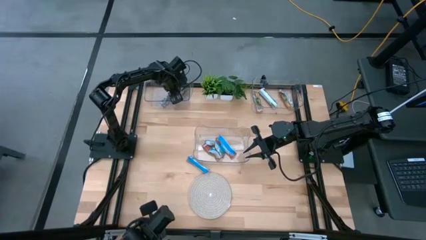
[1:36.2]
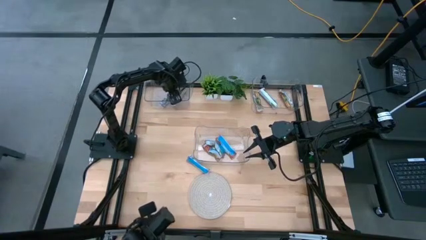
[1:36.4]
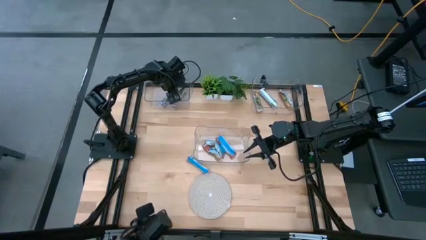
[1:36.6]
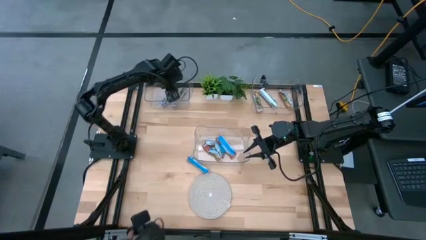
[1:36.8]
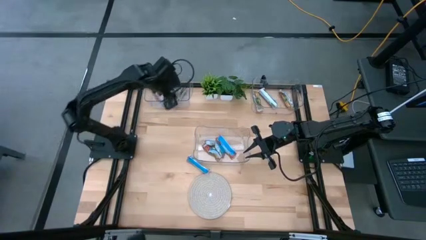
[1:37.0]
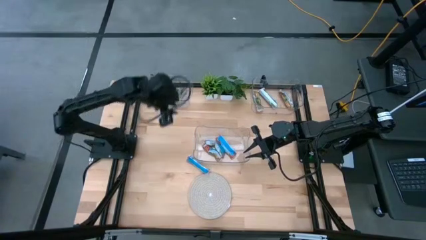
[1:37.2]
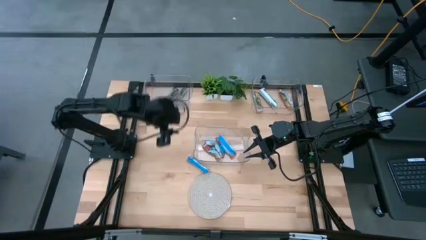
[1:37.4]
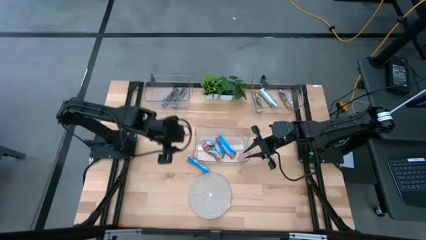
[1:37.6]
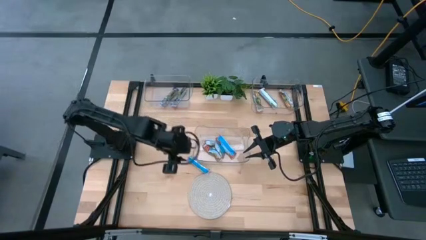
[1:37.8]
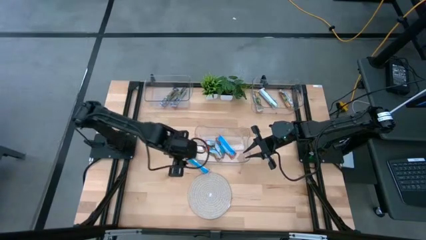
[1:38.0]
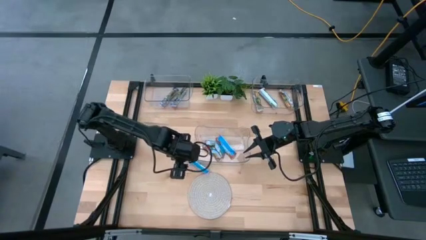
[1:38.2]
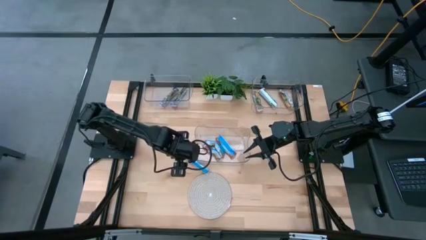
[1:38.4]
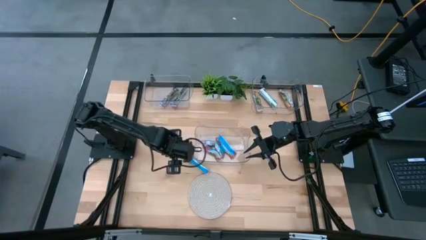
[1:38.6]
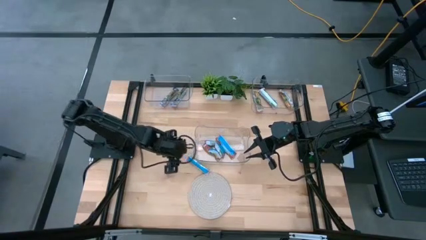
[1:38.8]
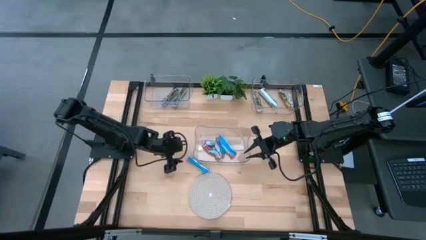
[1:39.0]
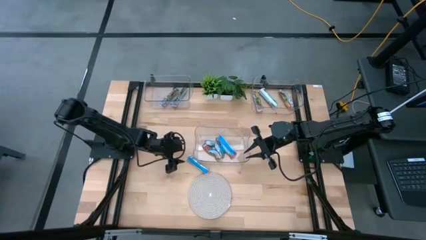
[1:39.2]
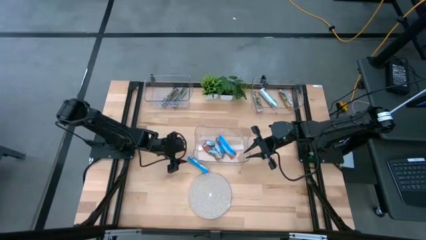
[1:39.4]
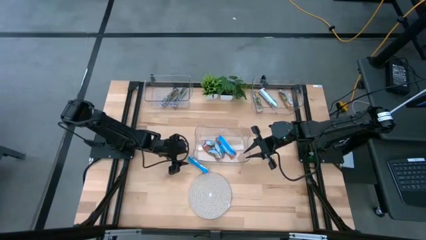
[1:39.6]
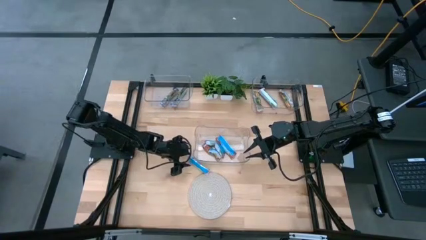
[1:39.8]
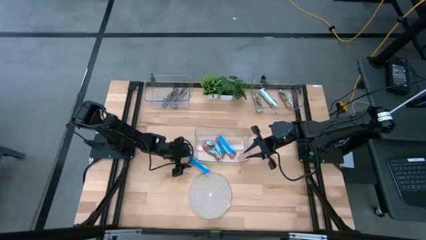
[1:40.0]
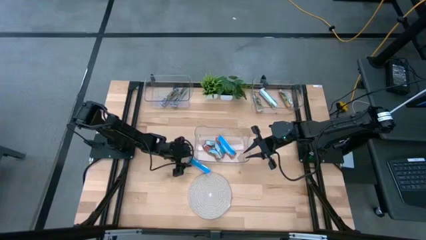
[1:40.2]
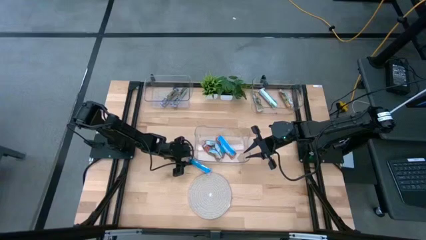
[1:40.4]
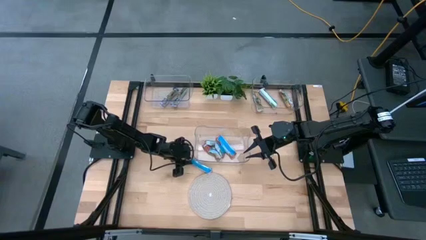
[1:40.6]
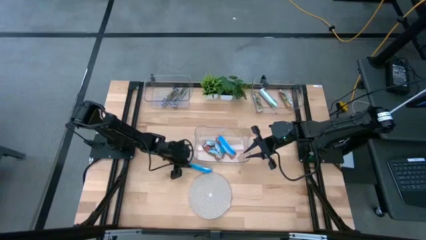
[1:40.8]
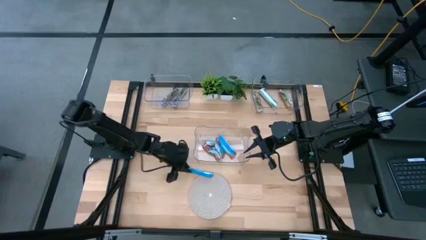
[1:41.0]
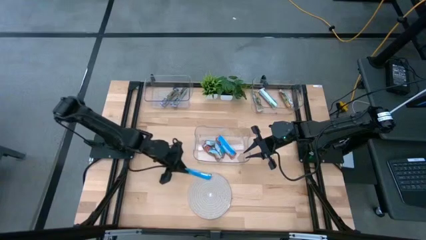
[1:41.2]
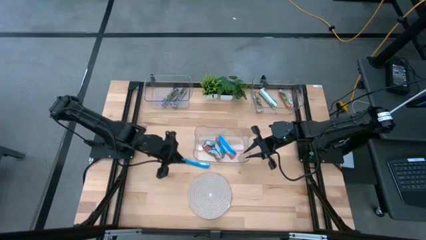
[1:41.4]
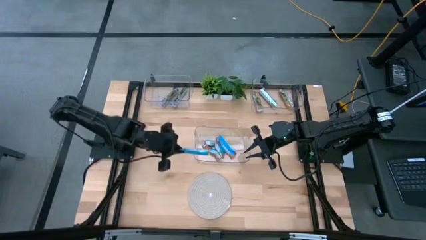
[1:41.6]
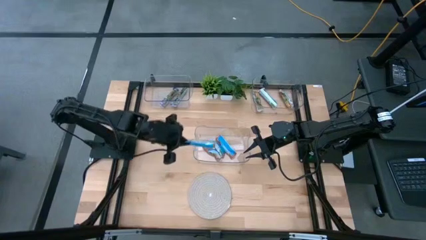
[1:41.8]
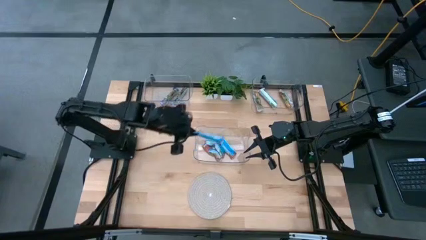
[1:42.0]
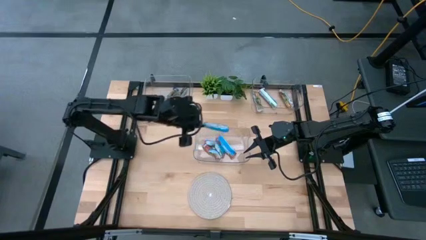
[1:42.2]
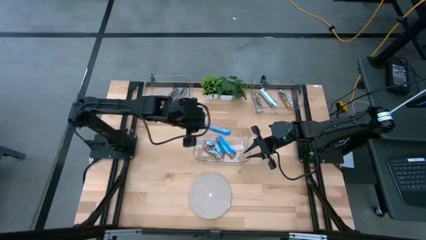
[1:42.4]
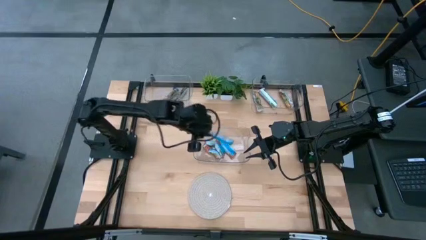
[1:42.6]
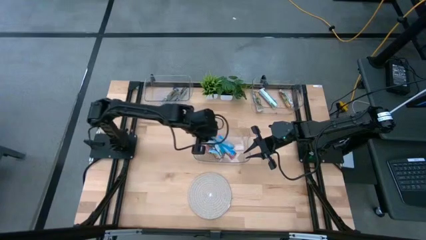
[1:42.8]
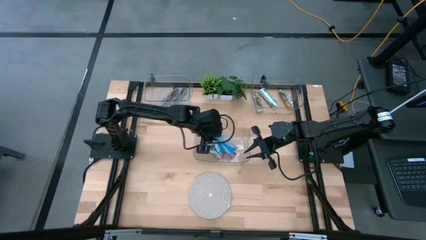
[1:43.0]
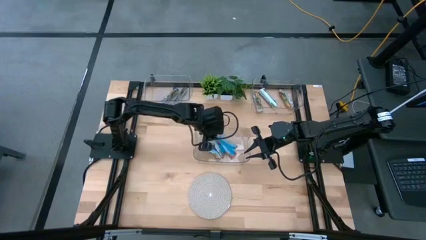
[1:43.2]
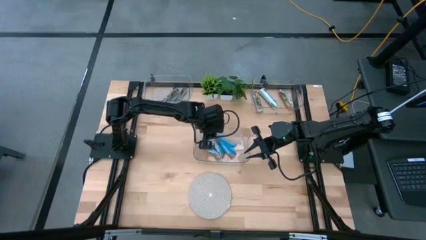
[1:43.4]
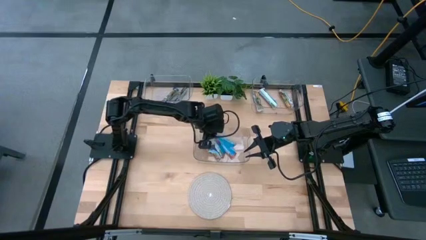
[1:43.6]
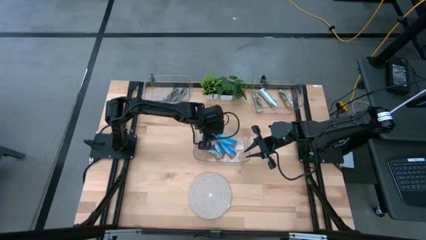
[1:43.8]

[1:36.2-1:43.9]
Task: Pick and place Granola Bars by type
Put the red granola bar into the middle transparent bin
